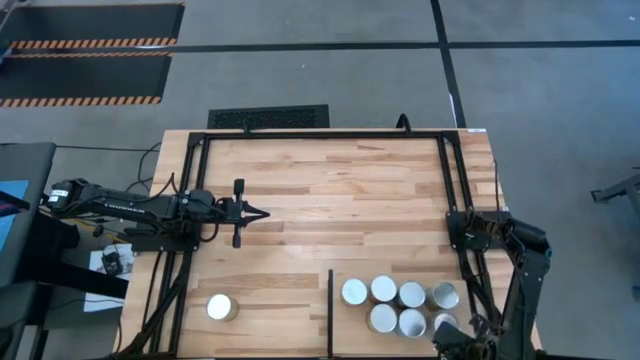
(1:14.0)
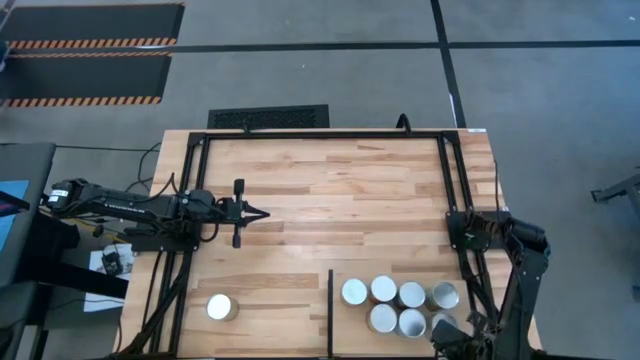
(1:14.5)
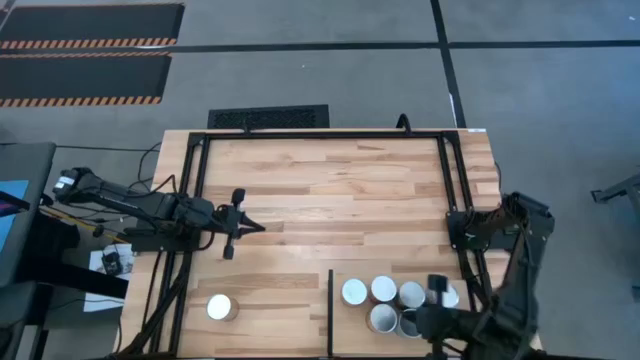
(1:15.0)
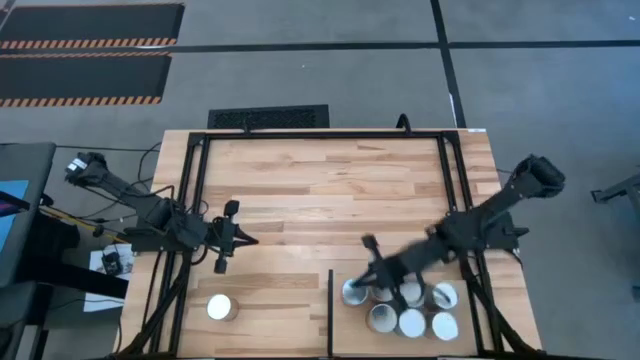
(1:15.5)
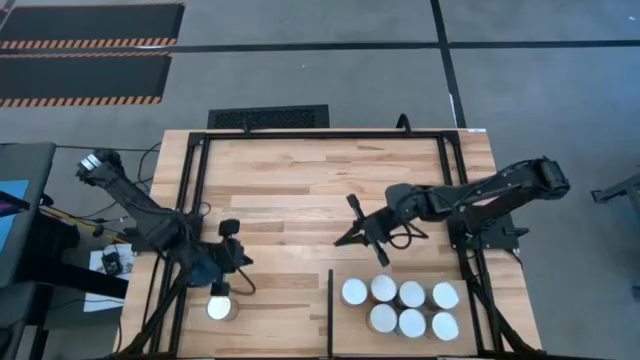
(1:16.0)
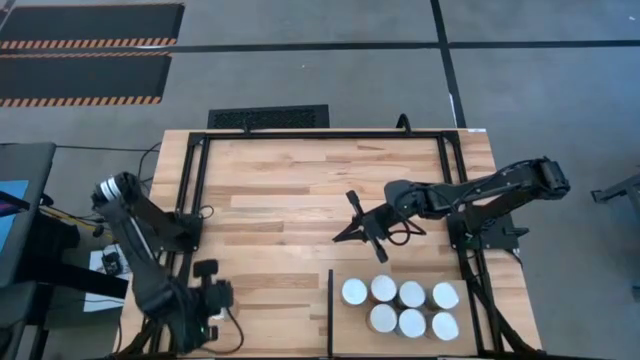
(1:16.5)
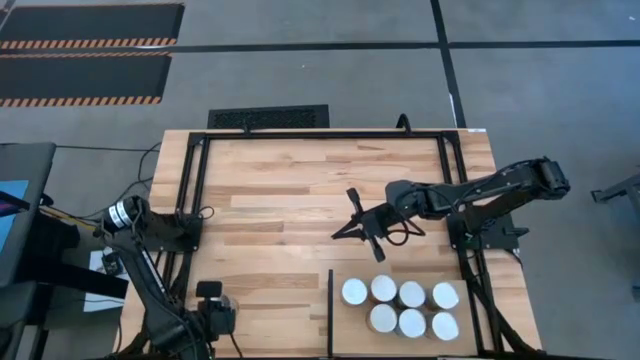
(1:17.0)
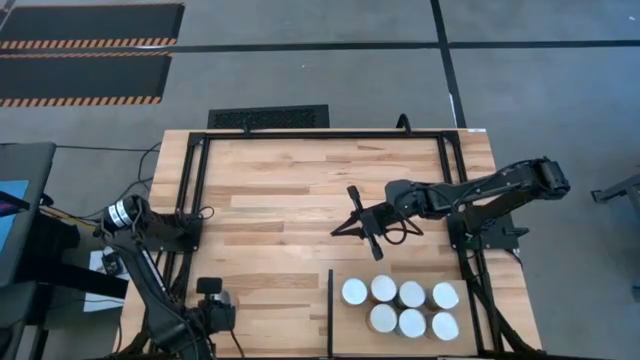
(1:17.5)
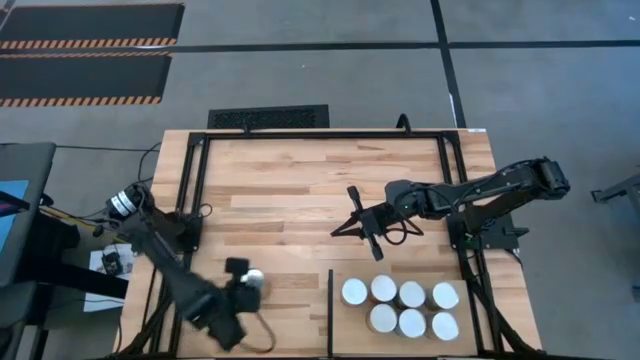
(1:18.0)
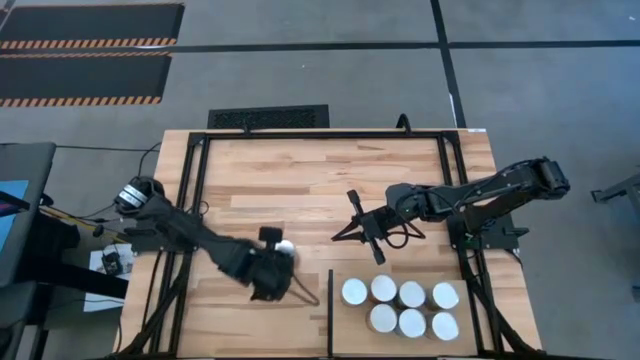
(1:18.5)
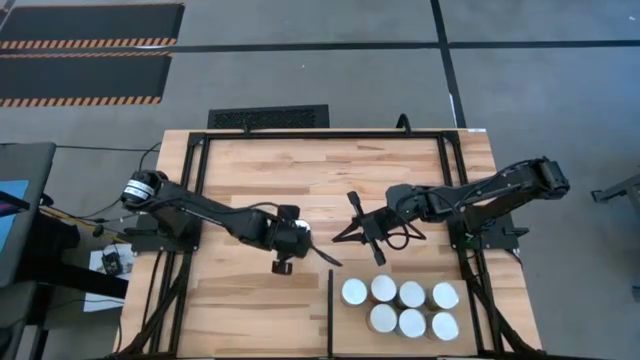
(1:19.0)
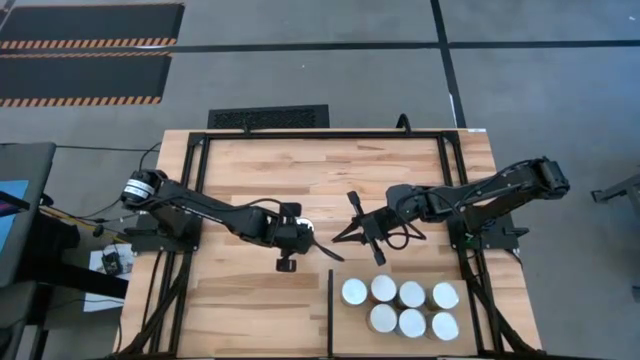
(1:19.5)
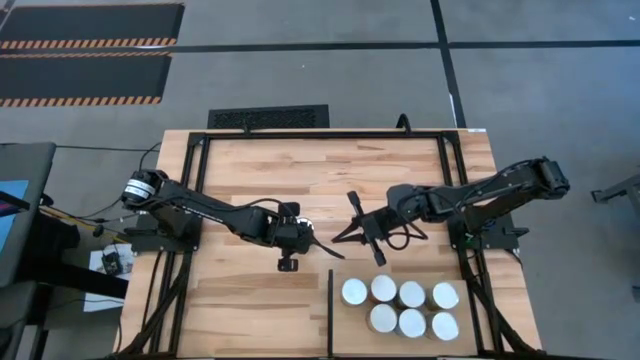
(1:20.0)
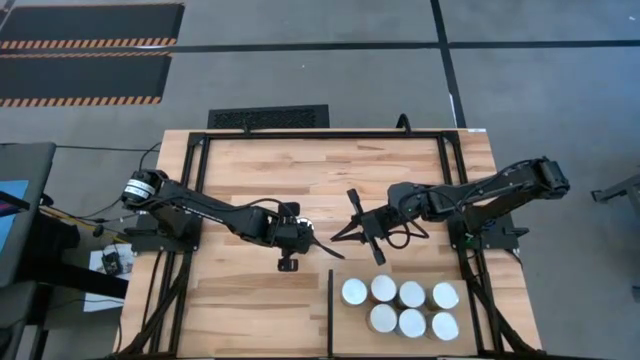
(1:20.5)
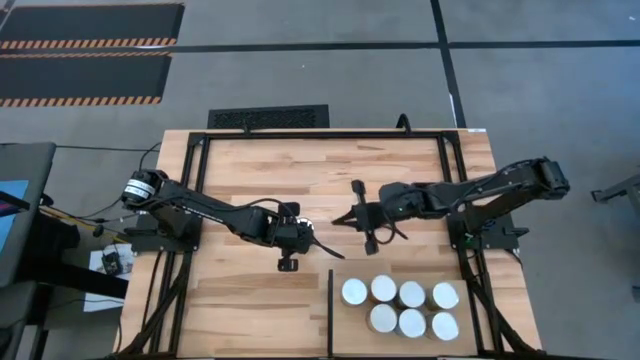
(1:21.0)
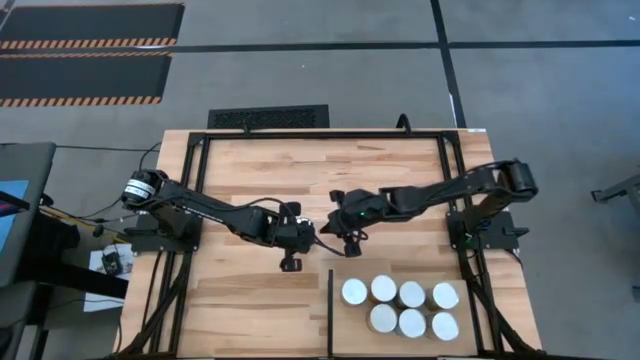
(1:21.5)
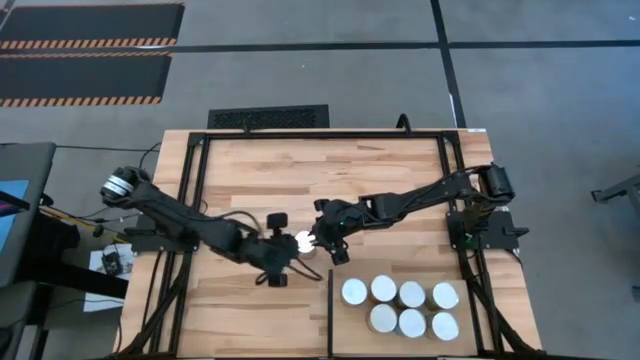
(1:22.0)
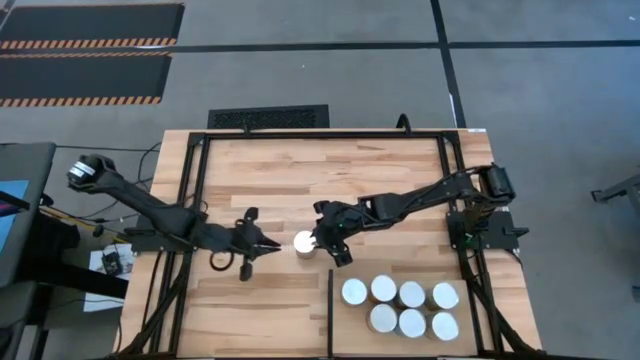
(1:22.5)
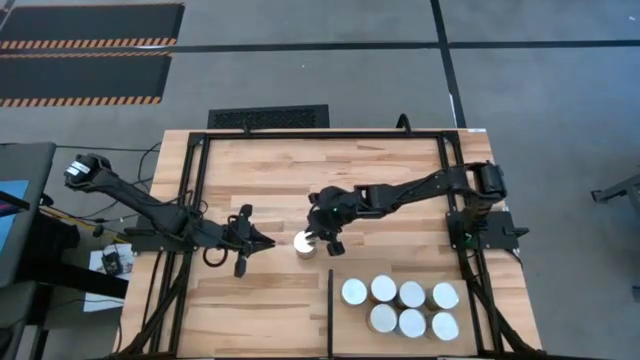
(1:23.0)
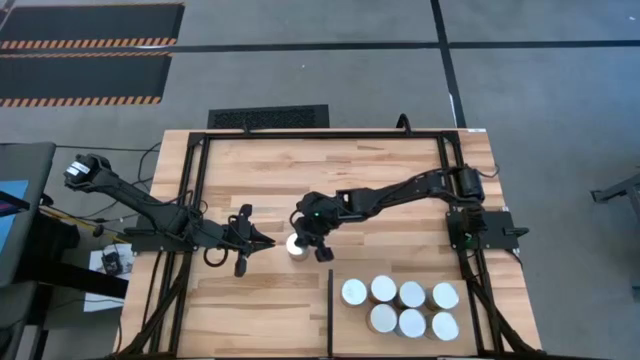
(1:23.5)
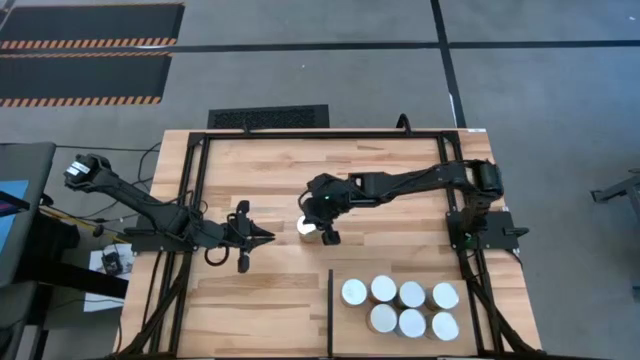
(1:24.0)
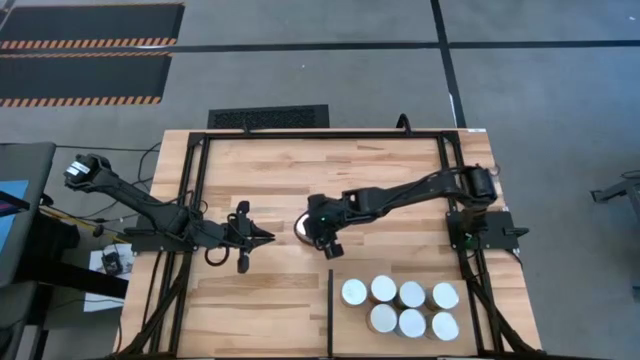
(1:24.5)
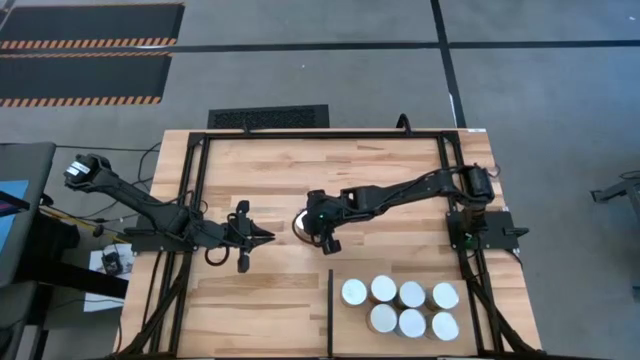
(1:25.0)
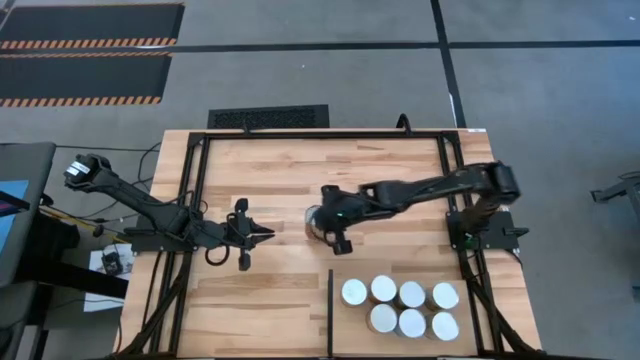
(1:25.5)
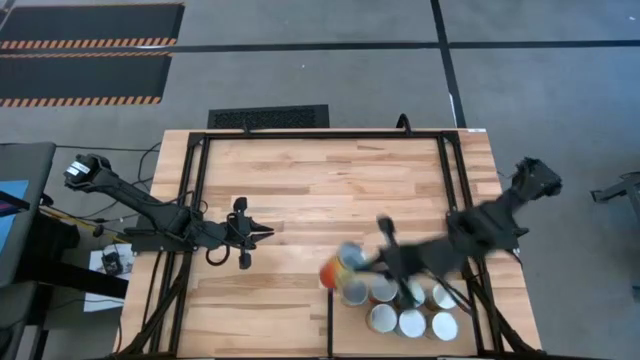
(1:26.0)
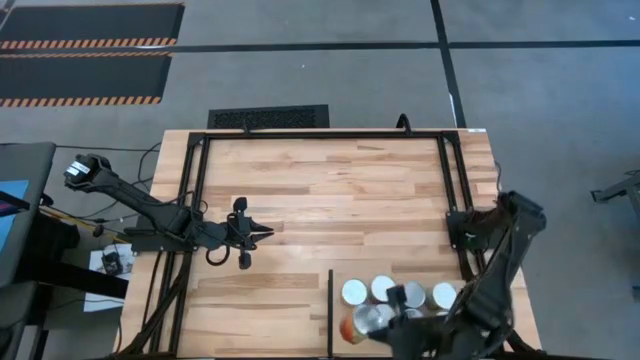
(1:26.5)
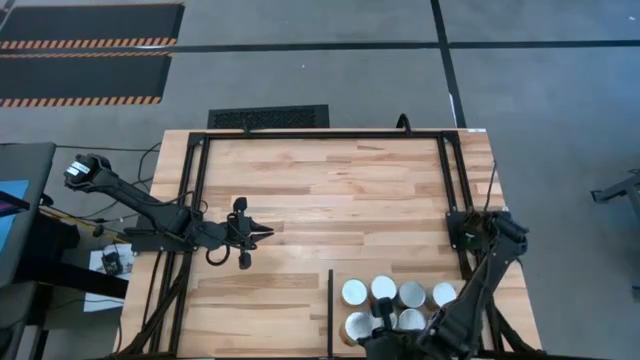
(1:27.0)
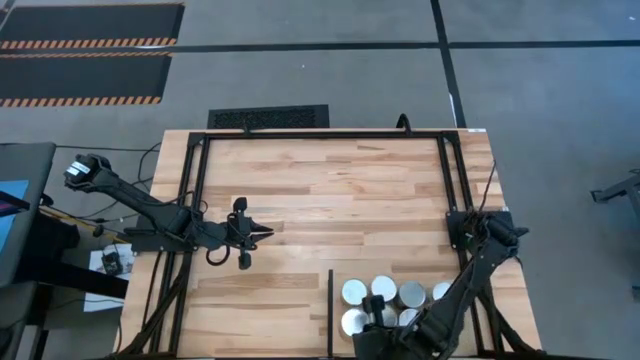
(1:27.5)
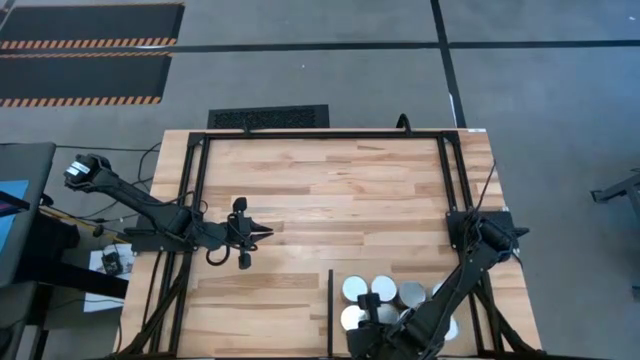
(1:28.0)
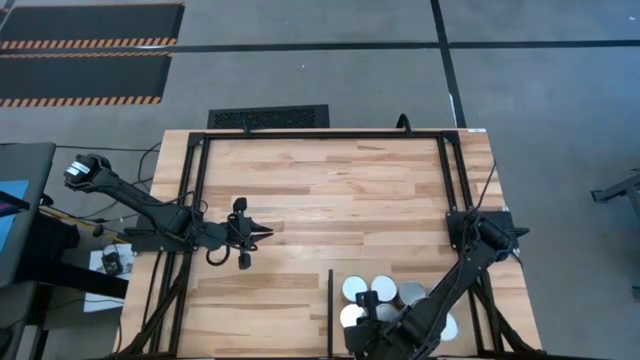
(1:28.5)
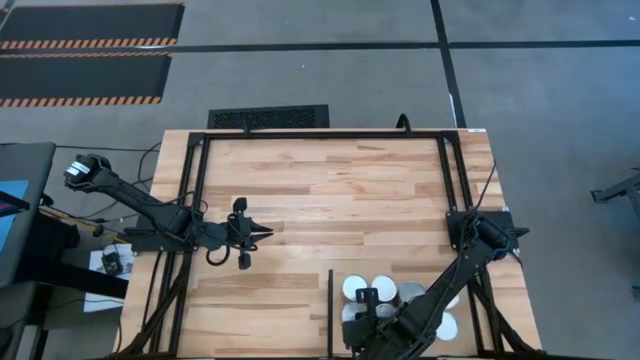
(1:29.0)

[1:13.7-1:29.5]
Task: Pick and place cans onto a shelf
Put the canned green beans on the shelf aligned with the other canned green beans

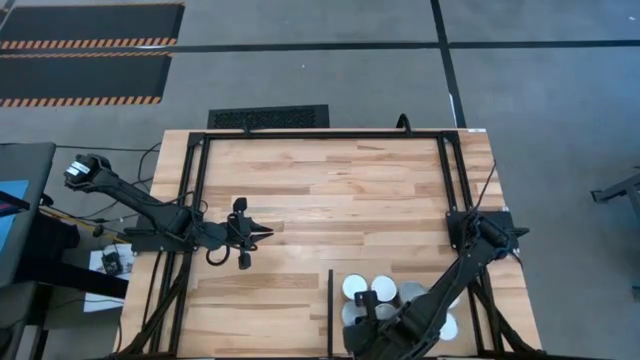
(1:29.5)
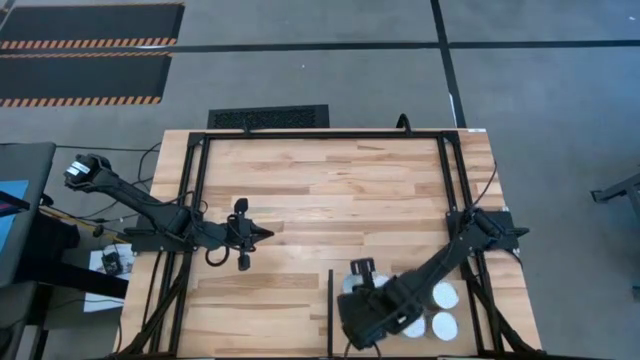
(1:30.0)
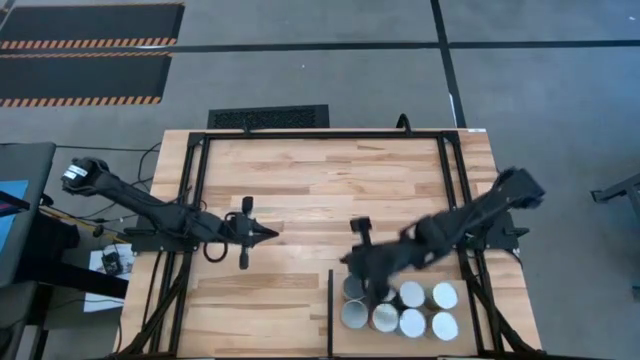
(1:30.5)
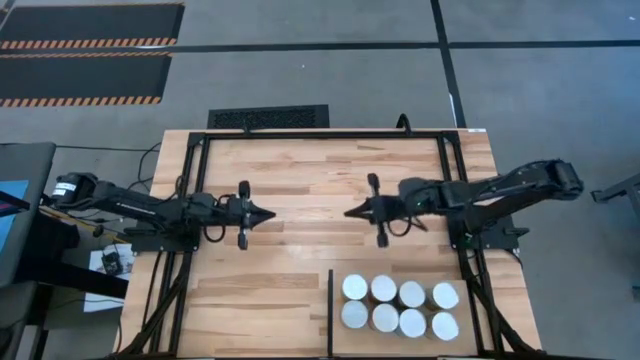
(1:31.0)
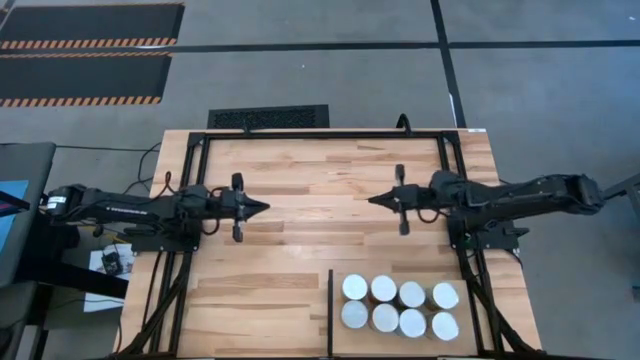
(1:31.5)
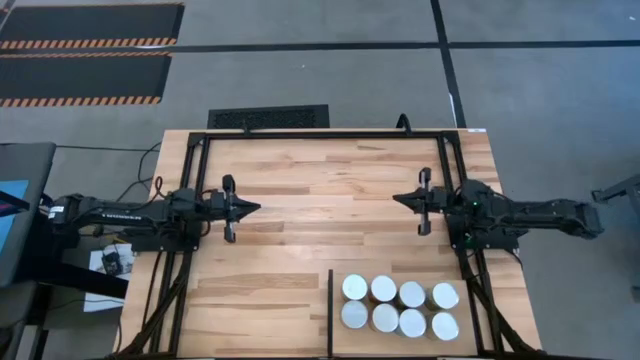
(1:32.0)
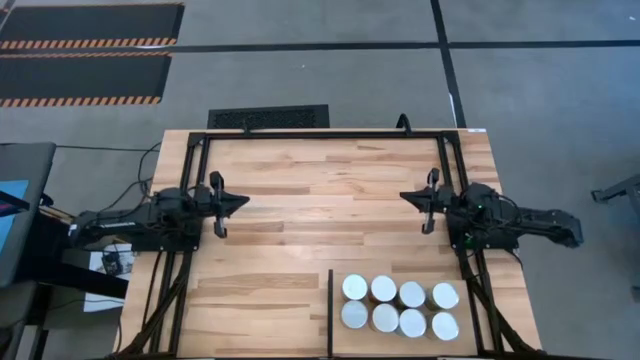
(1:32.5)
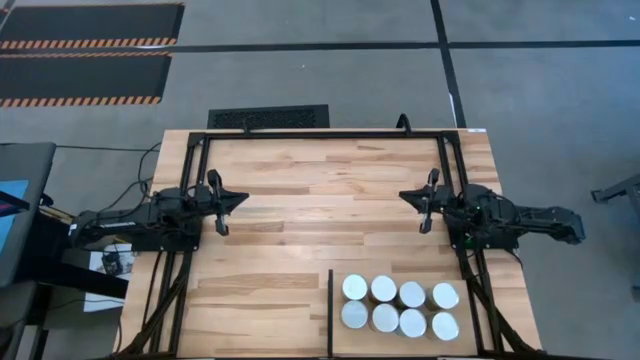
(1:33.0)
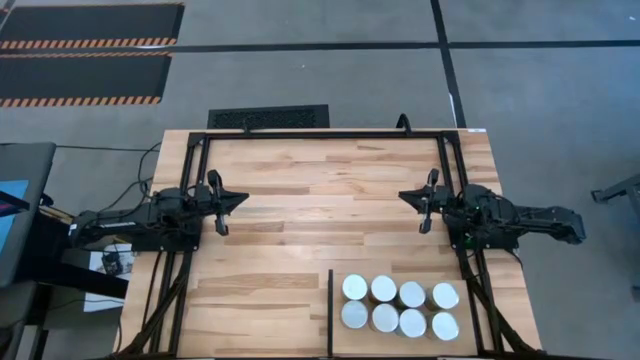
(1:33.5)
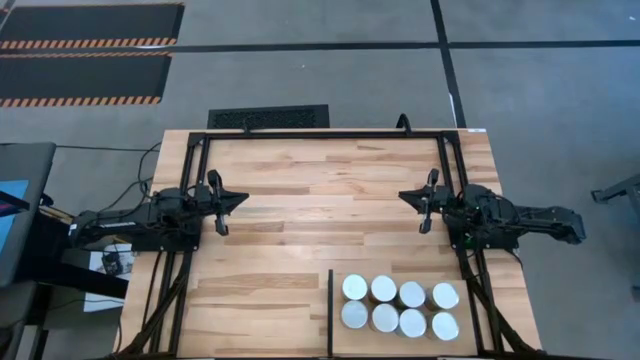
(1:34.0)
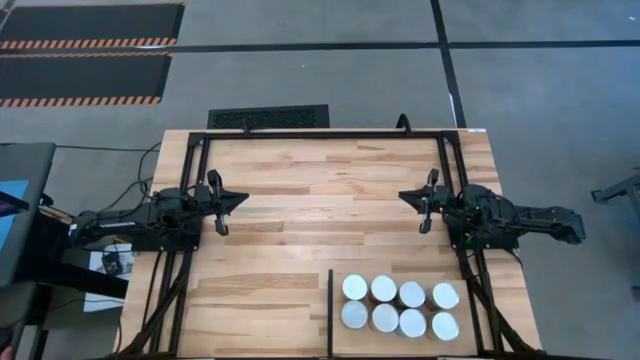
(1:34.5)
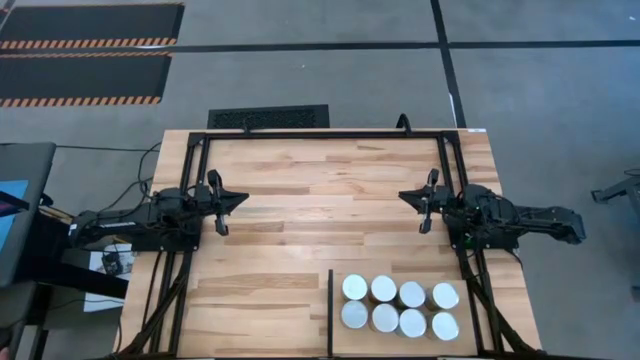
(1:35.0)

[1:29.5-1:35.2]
Return to Home Position

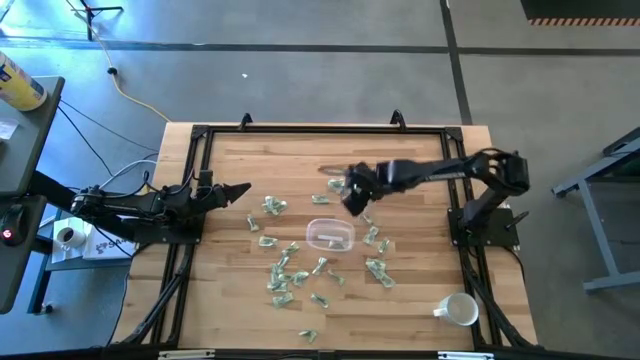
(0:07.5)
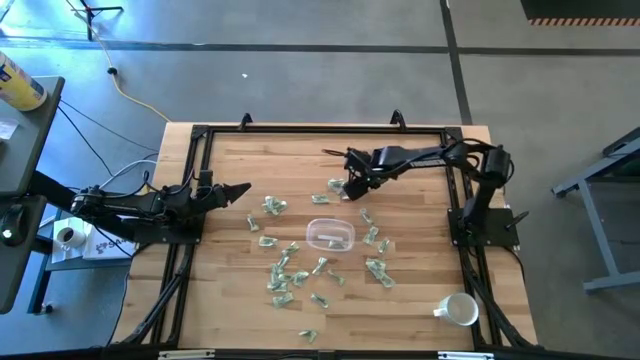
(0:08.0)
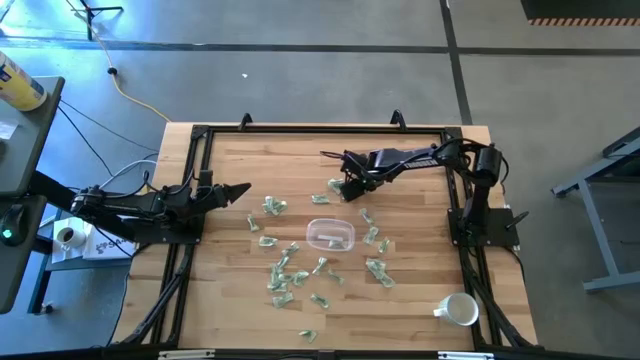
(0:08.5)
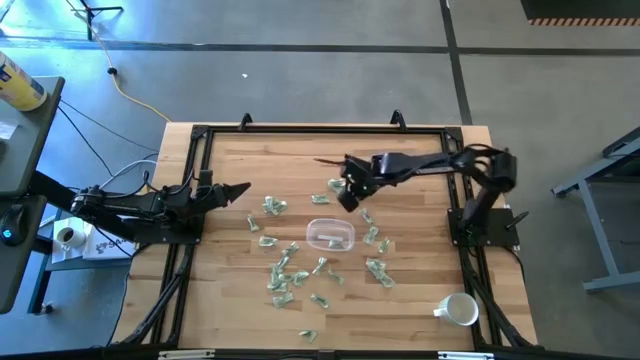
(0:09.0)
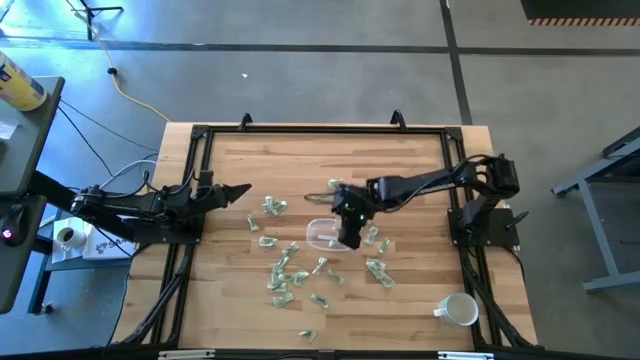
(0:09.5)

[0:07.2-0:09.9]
Task: Pick and place Stevia / Truvia into bins
Put the green stevia packet into the transparent container
